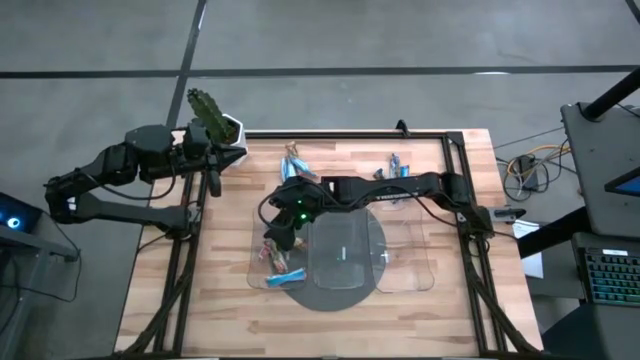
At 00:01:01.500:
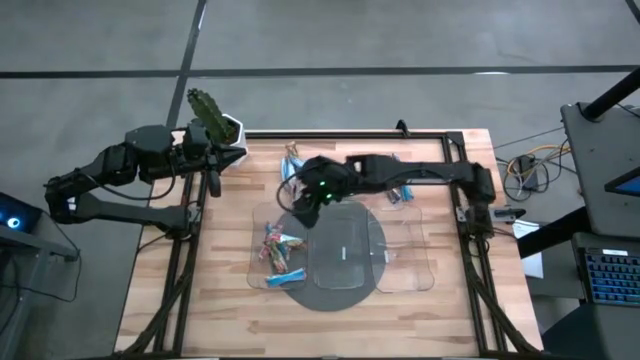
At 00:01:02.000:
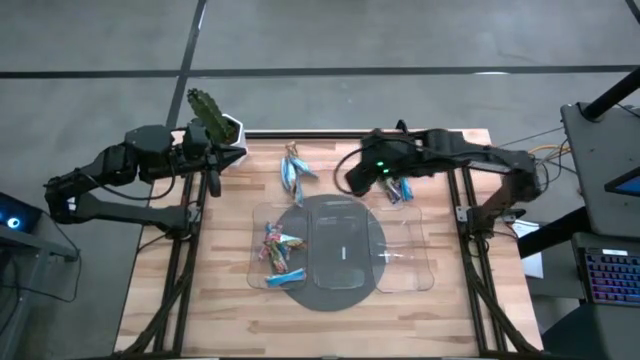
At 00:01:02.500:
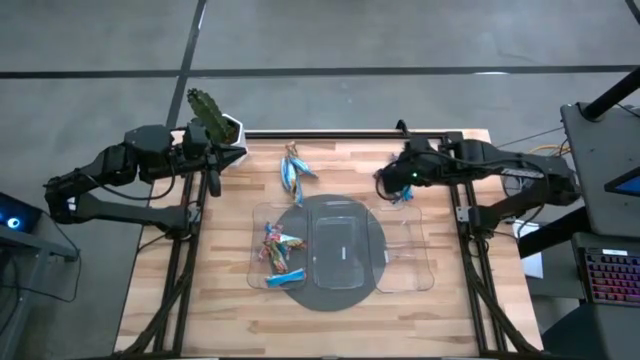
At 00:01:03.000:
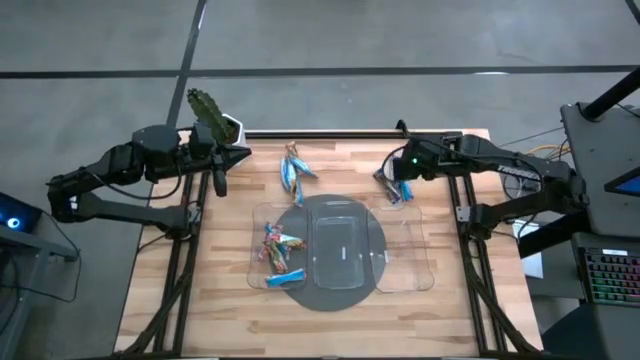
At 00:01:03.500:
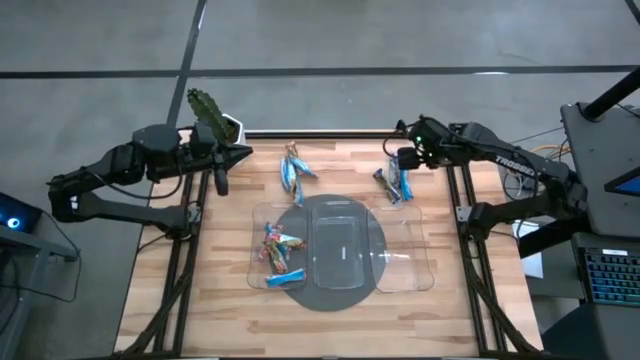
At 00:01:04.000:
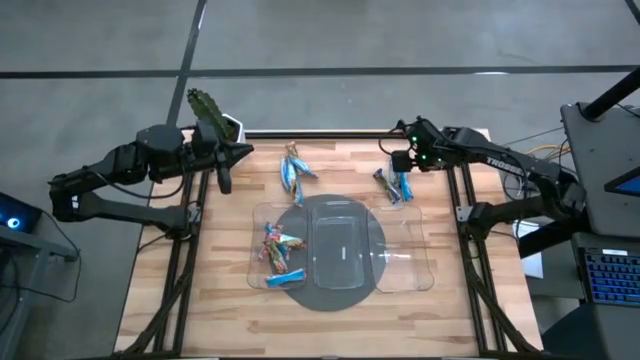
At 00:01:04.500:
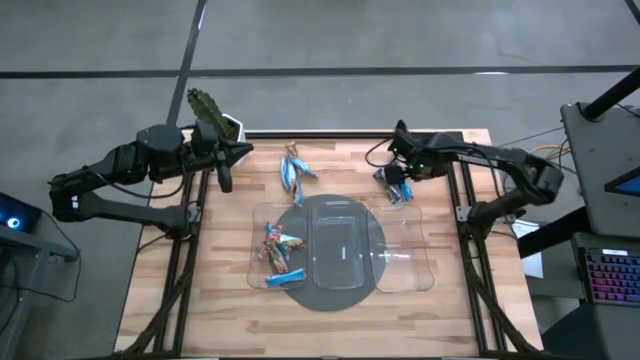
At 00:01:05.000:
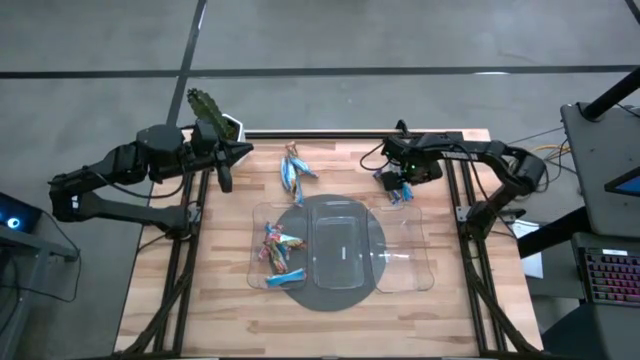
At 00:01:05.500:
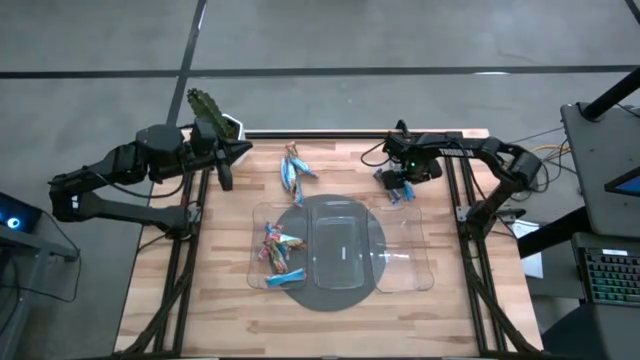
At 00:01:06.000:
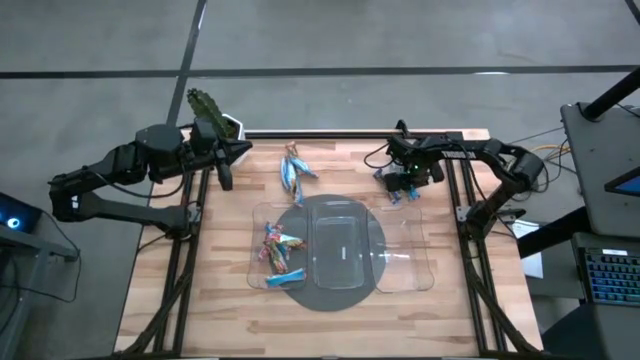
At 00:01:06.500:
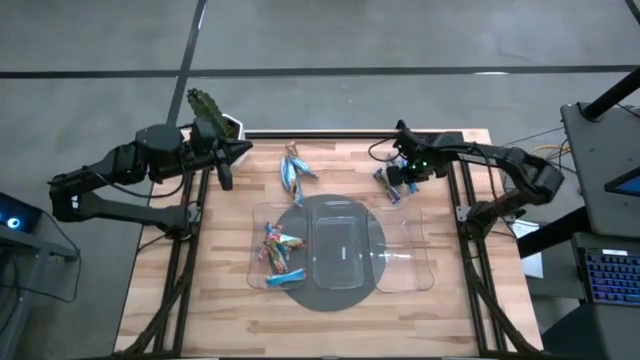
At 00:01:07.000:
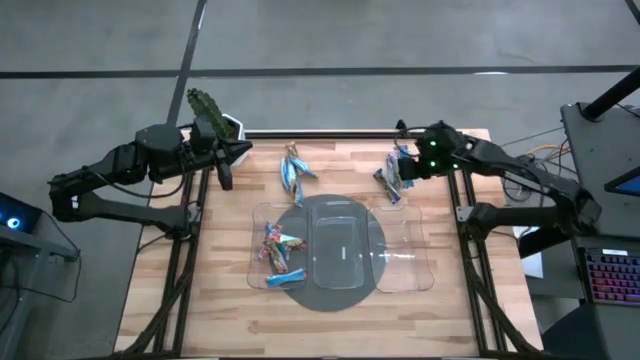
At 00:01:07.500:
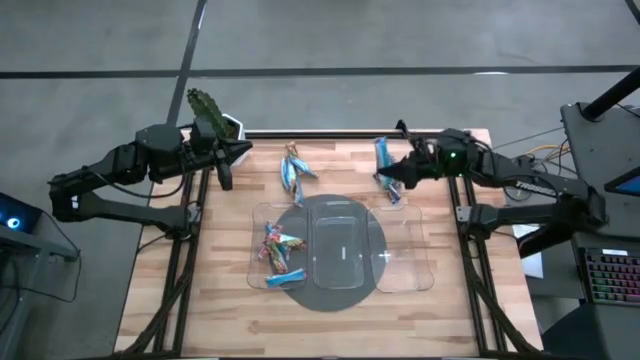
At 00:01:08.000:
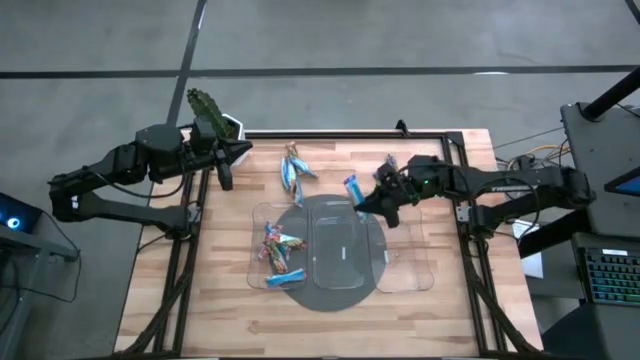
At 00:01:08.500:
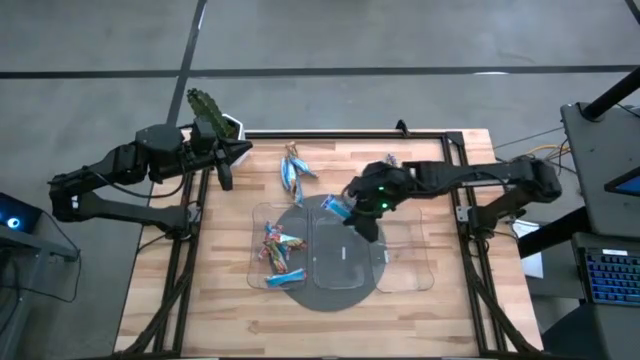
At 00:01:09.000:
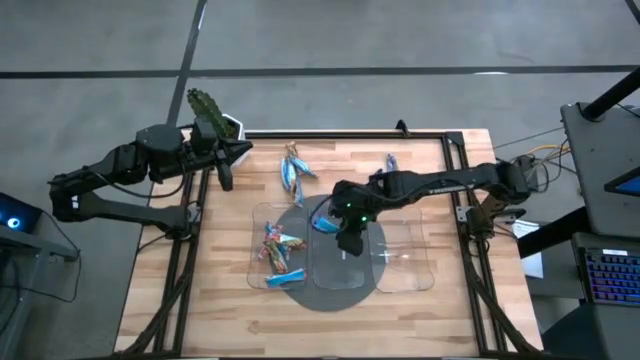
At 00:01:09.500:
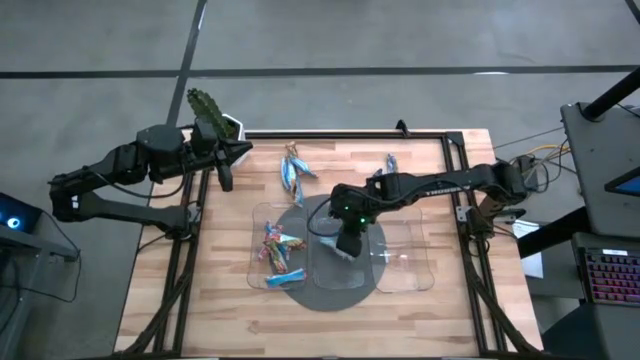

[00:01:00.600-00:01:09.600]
Task: Pick and place Granola Bars by type
Put the blue granola bar into the middle transparent bin

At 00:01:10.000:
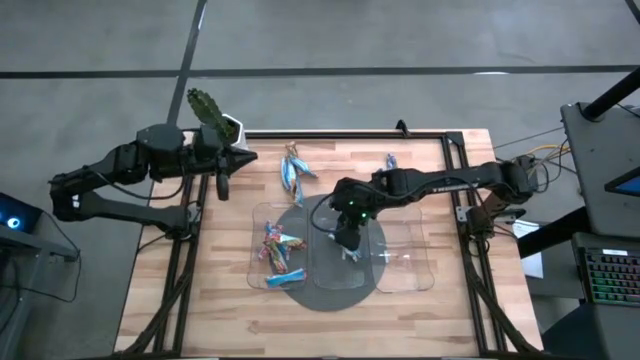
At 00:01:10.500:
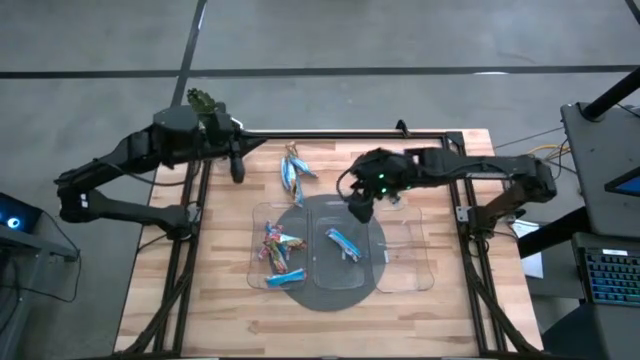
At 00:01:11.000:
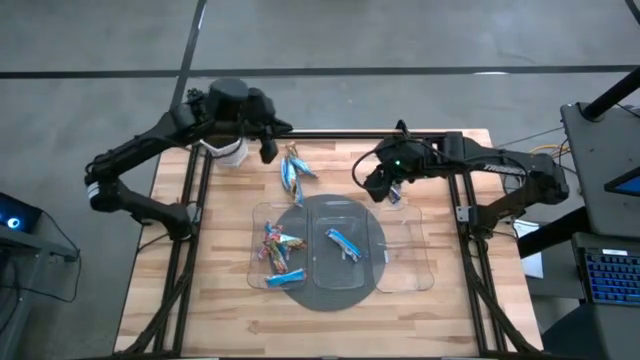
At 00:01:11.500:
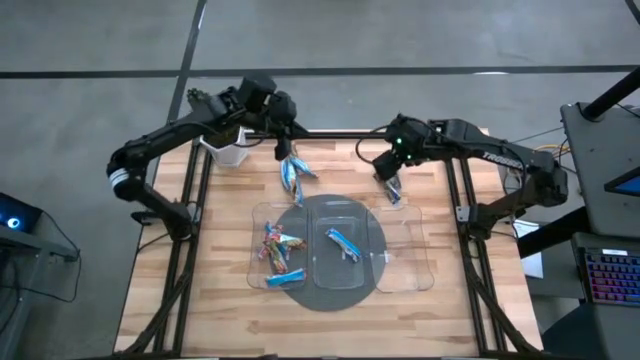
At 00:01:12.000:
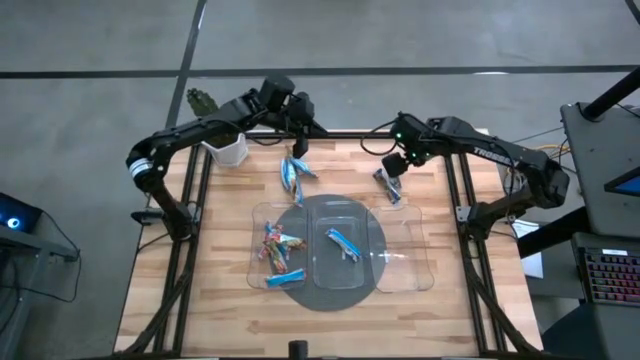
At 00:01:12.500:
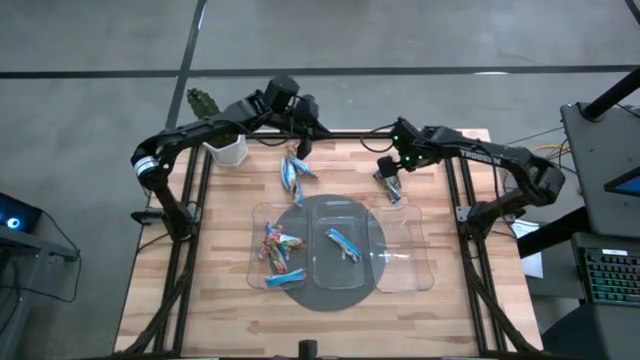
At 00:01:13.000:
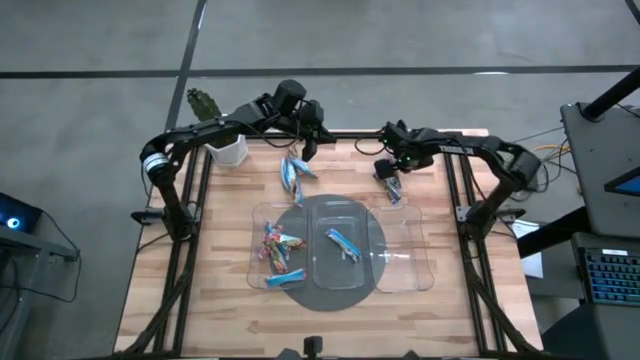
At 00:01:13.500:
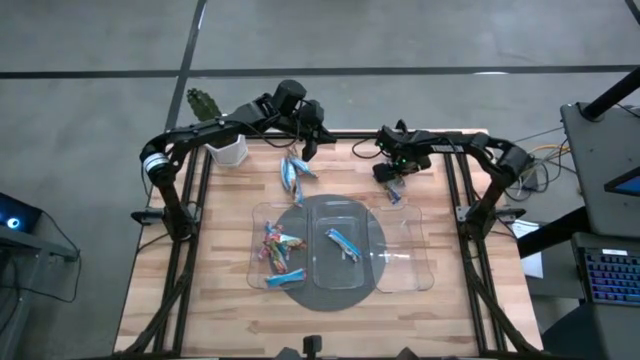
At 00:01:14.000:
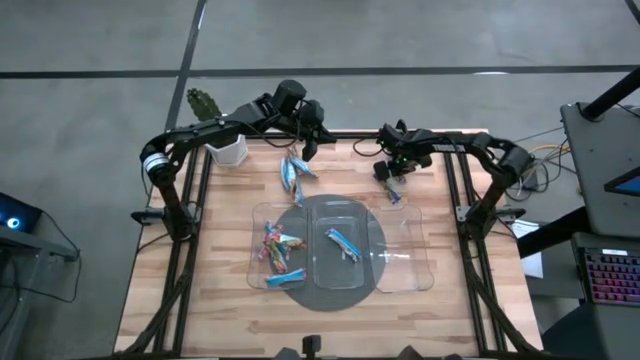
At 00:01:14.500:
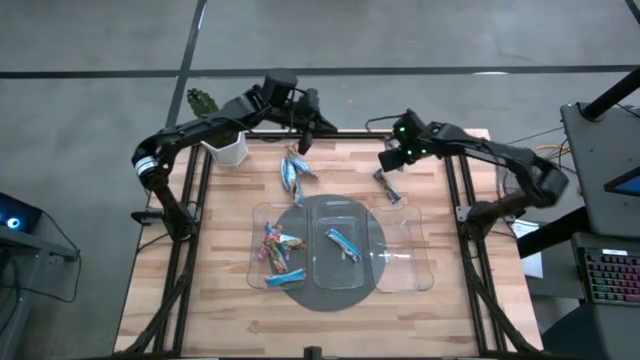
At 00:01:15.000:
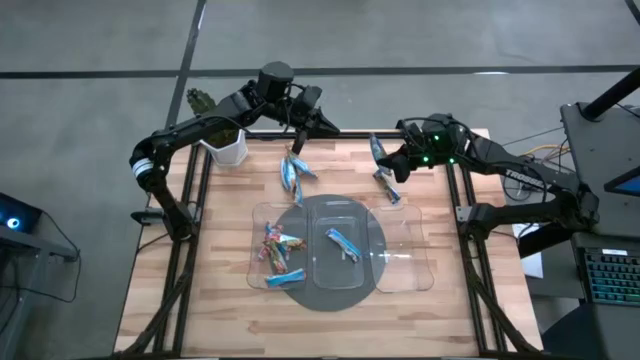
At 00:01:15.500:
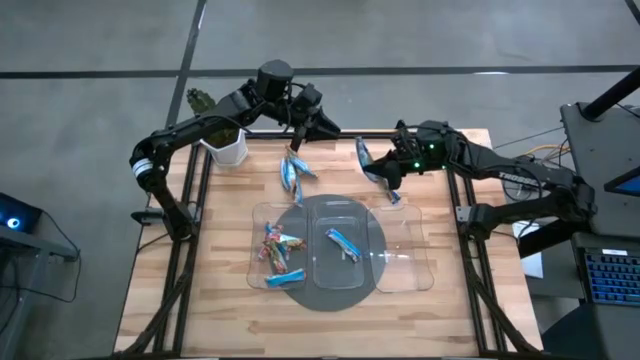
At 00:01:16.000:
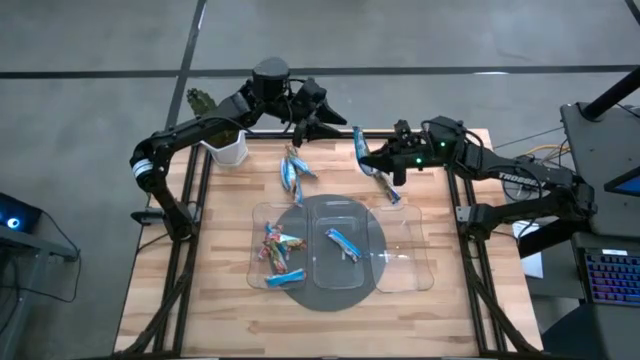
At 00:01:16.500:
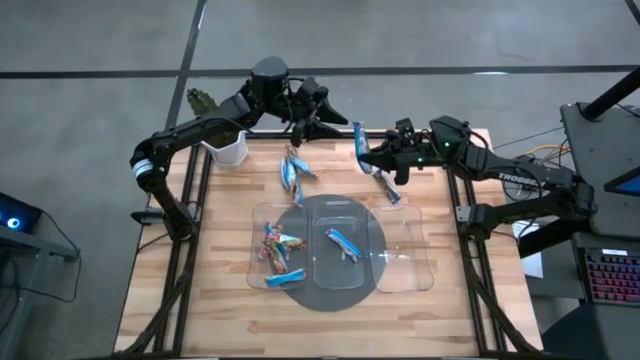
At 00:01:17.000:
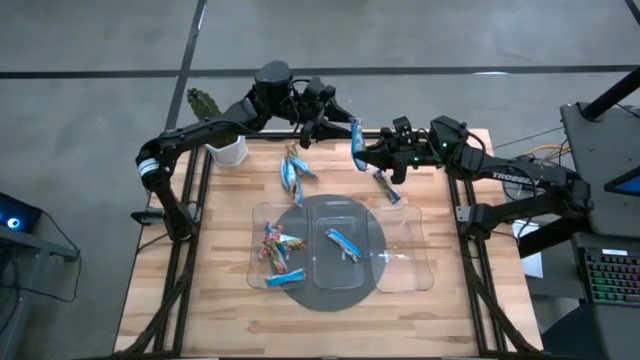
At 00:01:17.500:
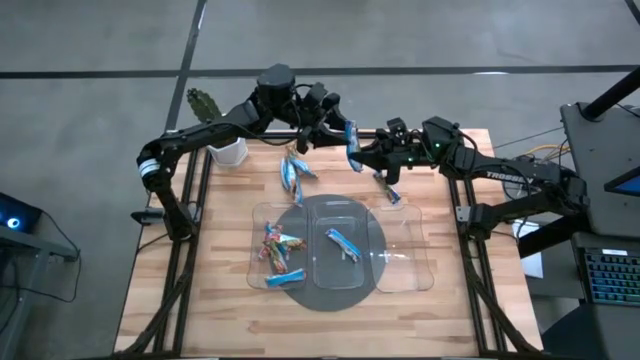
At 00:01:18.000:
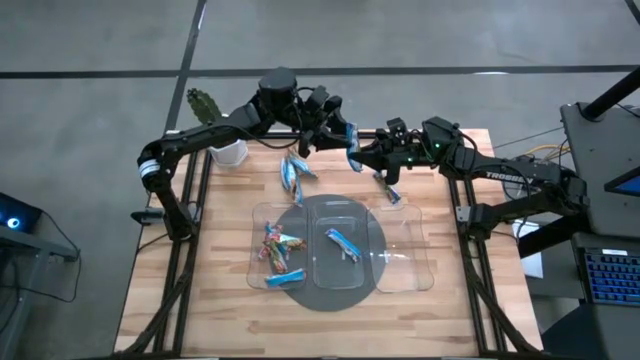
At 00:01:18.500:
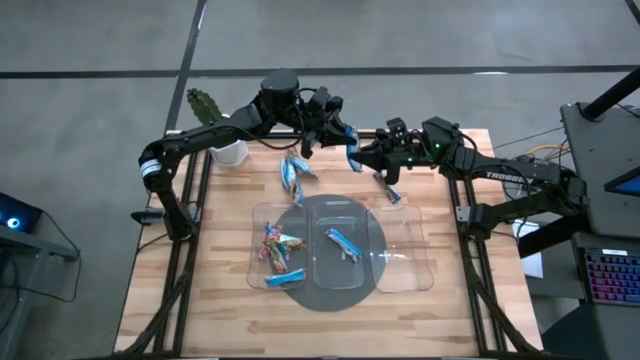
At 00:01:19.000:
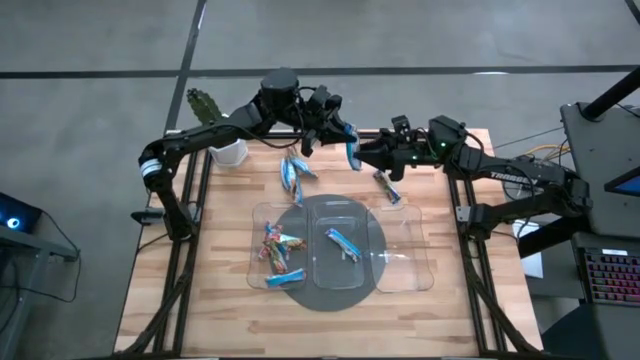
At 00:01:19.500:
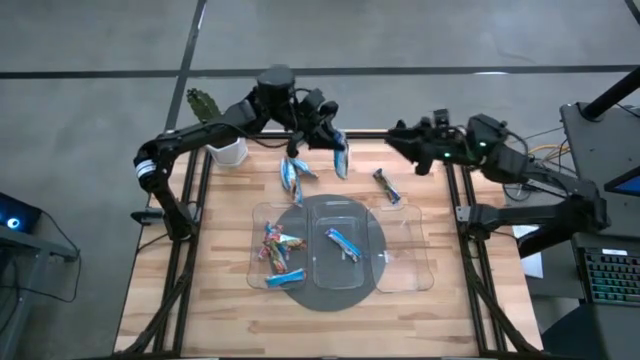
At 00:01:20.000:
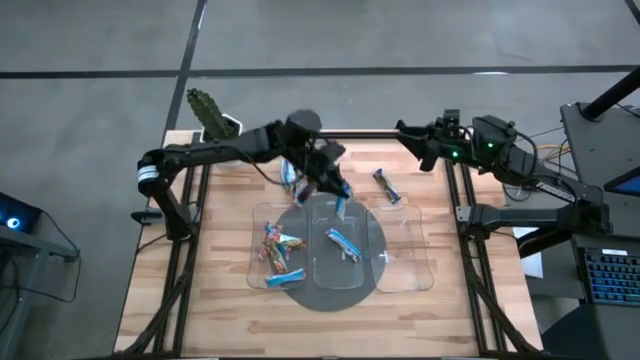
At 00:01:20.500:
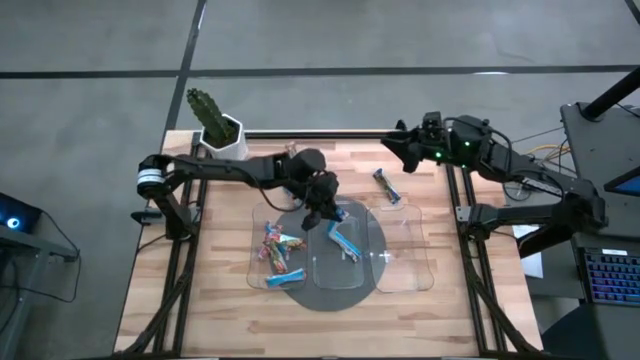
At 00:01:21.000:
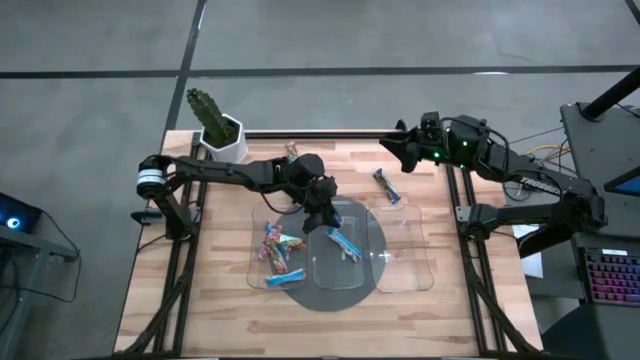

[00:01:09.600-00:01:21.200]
Put the blue granola bar into the middle transparent bin

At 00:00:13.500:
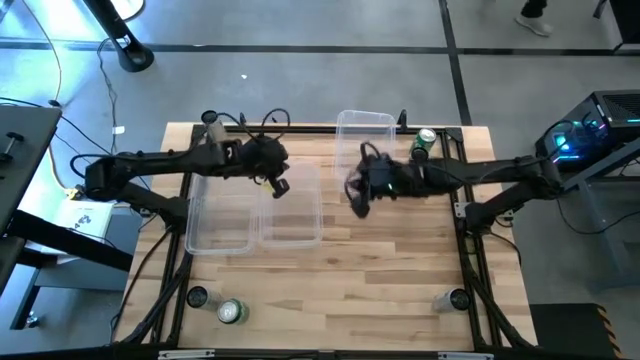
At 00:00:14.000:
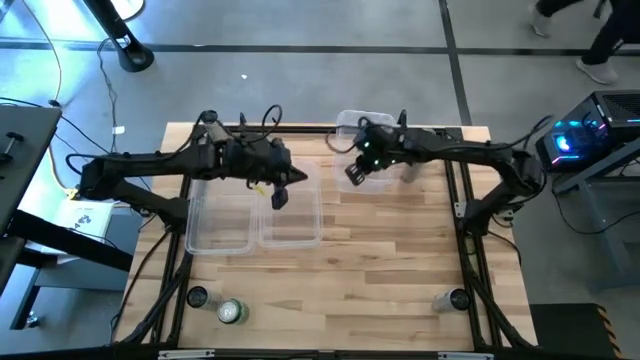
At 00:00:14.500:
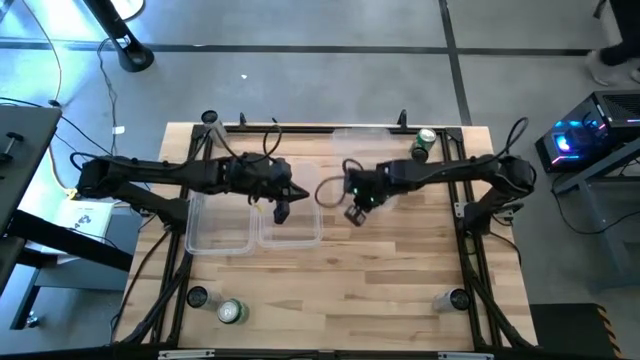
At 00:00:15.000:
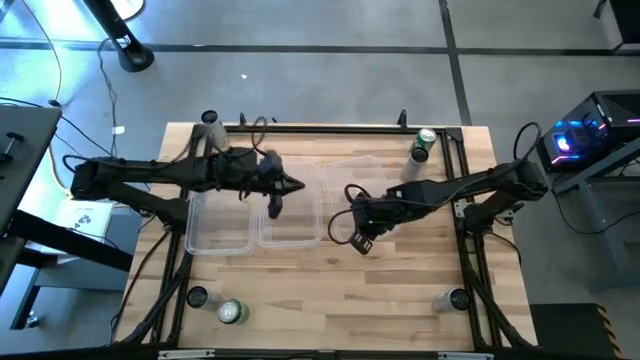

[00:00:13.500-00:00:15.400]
Task: Sort soda cans
Move the transparent container from the top to the left of the table
